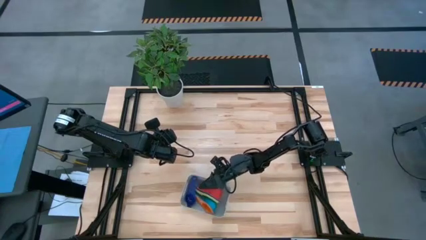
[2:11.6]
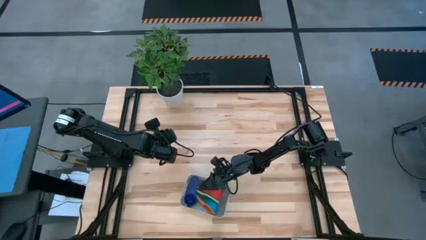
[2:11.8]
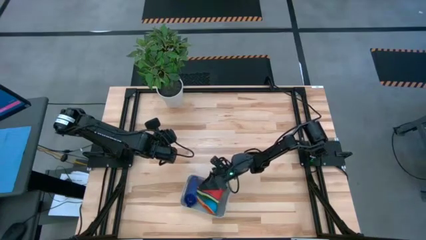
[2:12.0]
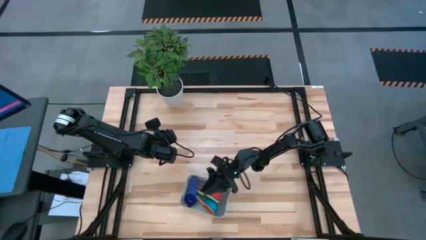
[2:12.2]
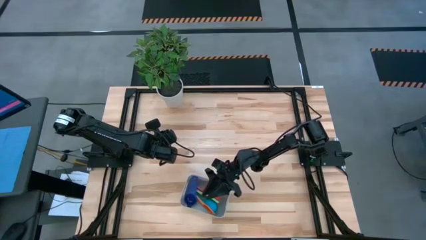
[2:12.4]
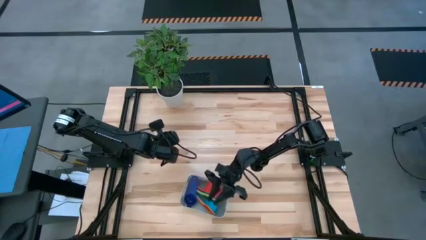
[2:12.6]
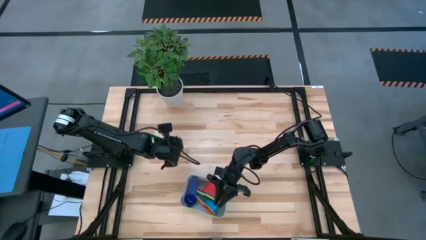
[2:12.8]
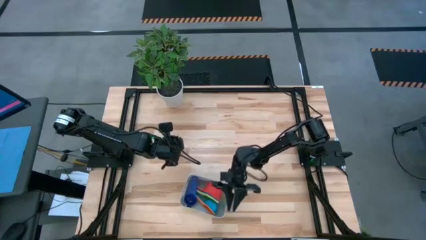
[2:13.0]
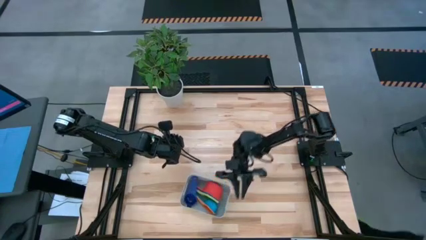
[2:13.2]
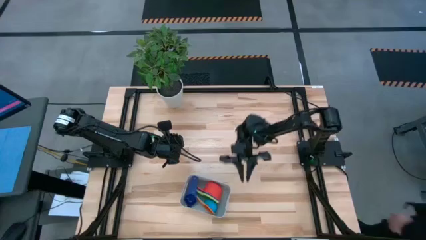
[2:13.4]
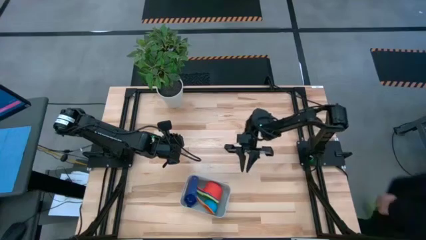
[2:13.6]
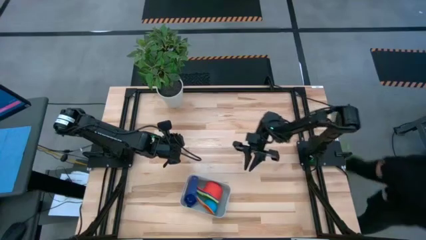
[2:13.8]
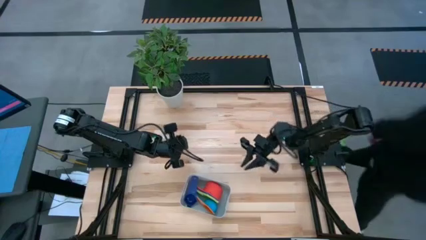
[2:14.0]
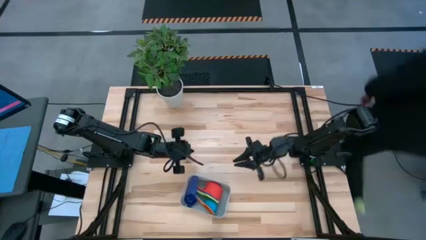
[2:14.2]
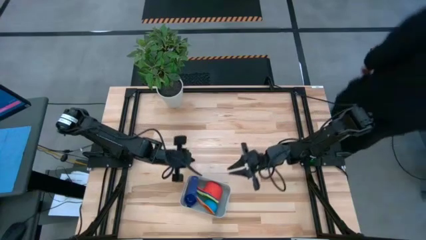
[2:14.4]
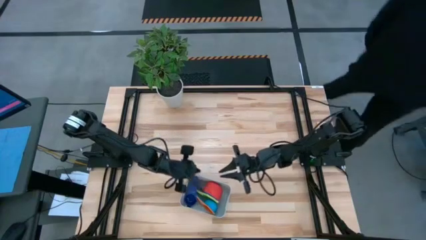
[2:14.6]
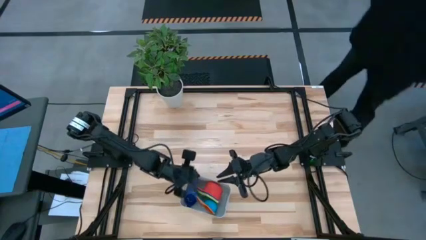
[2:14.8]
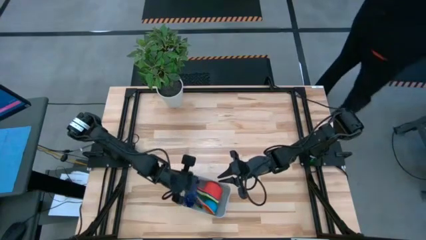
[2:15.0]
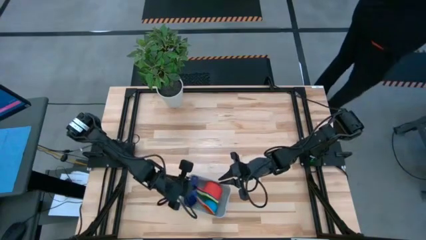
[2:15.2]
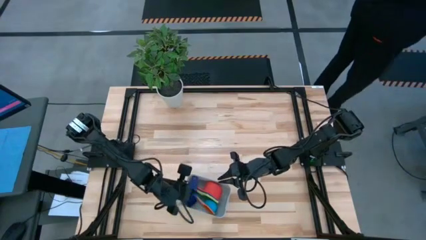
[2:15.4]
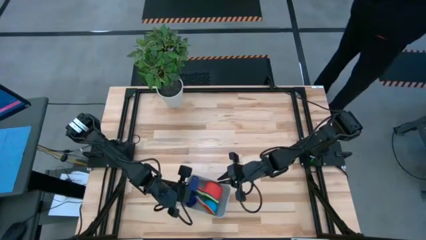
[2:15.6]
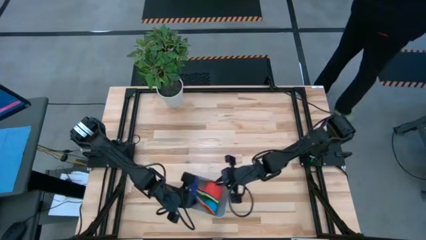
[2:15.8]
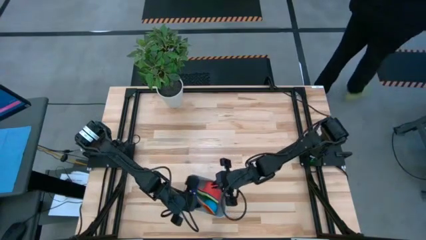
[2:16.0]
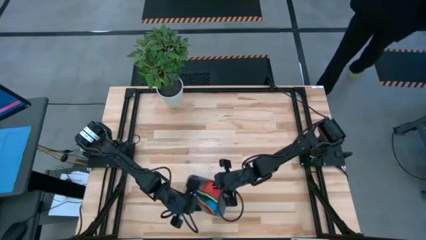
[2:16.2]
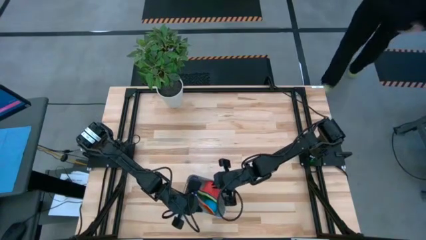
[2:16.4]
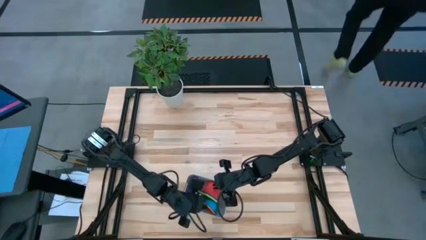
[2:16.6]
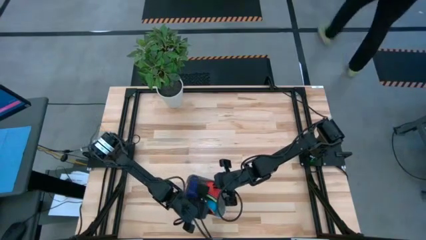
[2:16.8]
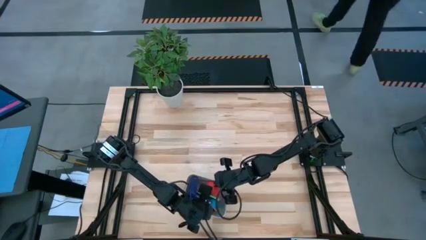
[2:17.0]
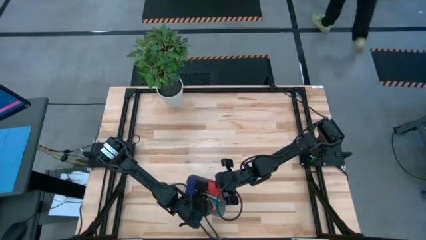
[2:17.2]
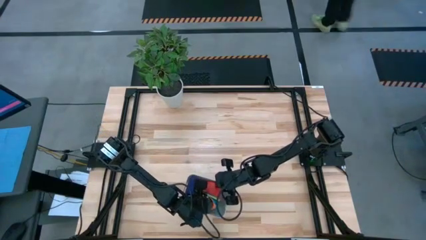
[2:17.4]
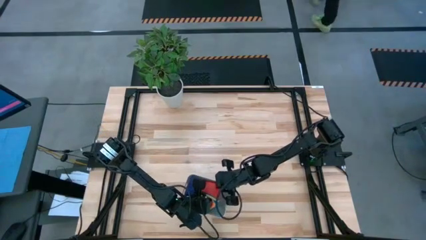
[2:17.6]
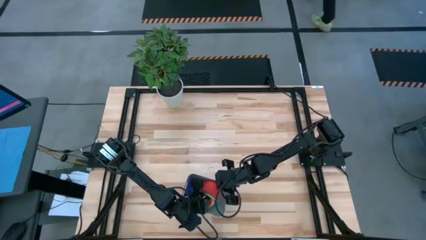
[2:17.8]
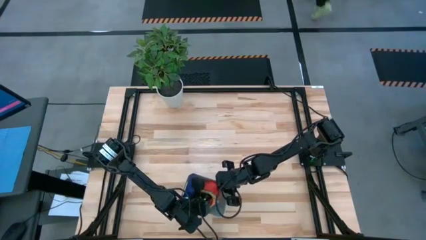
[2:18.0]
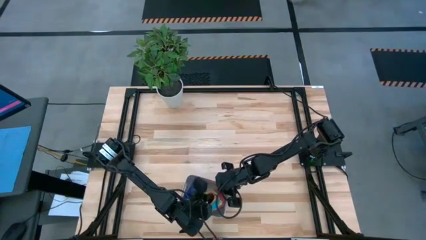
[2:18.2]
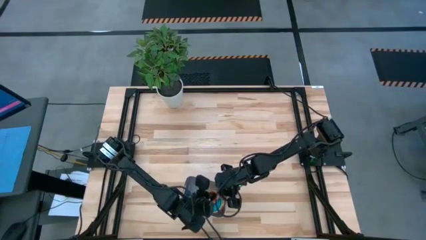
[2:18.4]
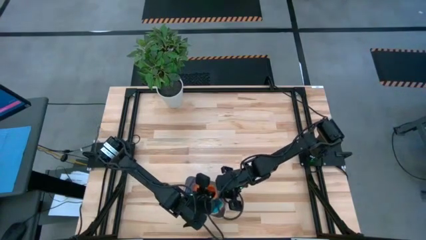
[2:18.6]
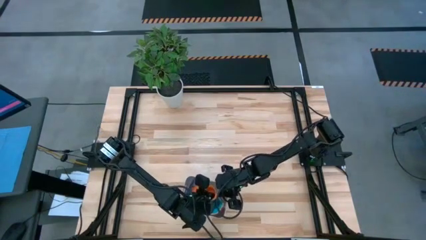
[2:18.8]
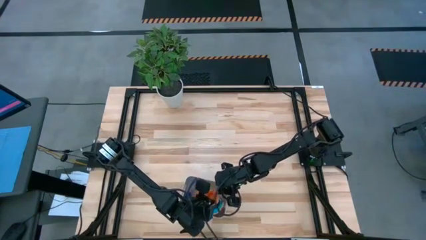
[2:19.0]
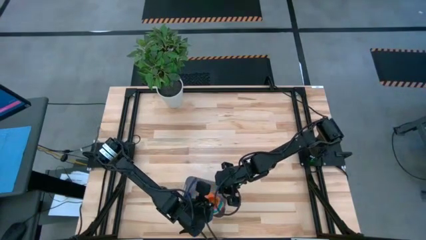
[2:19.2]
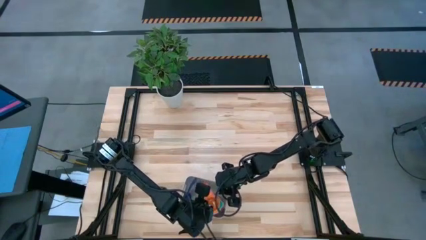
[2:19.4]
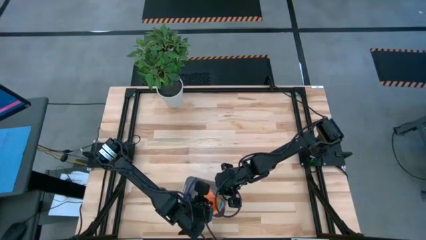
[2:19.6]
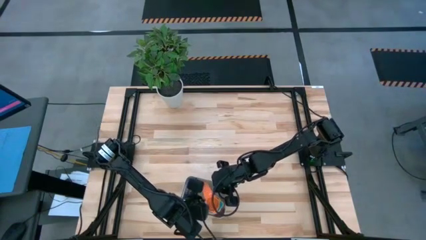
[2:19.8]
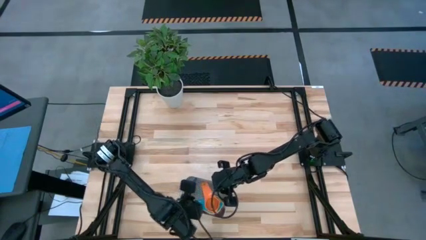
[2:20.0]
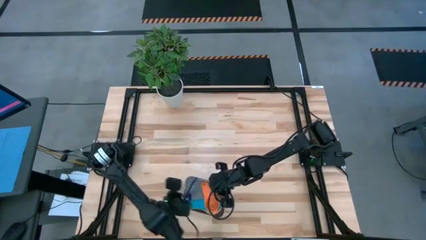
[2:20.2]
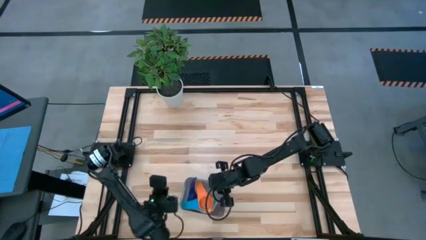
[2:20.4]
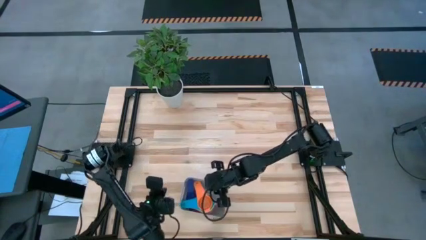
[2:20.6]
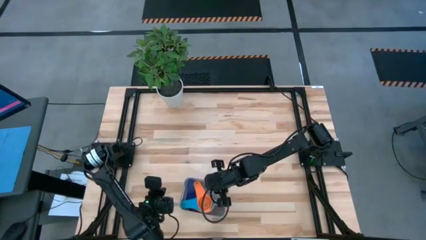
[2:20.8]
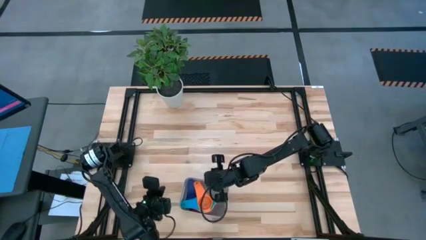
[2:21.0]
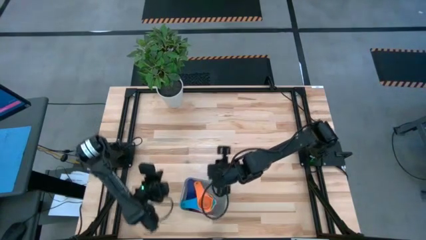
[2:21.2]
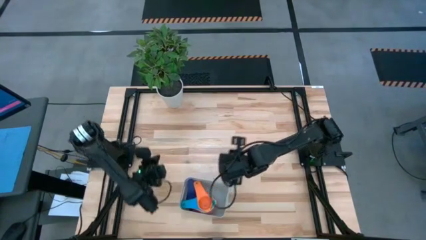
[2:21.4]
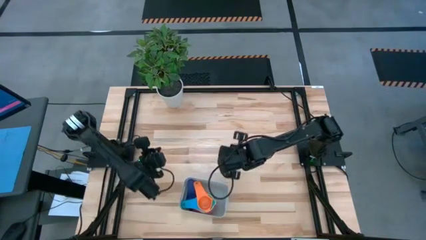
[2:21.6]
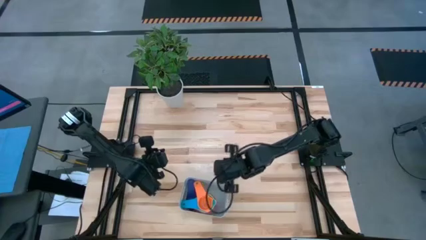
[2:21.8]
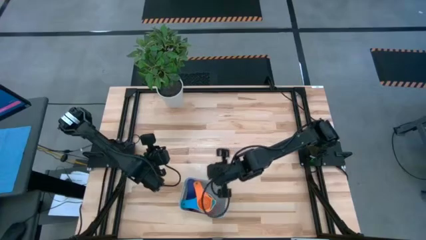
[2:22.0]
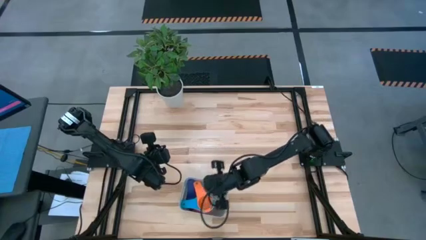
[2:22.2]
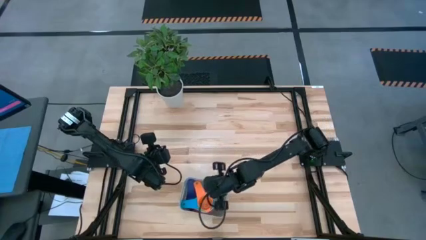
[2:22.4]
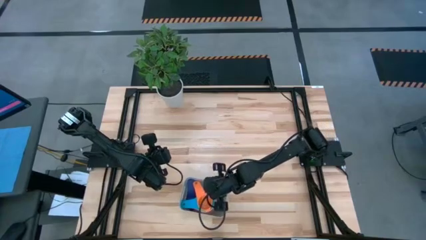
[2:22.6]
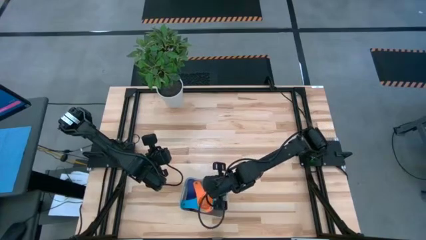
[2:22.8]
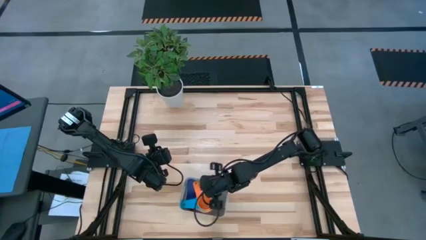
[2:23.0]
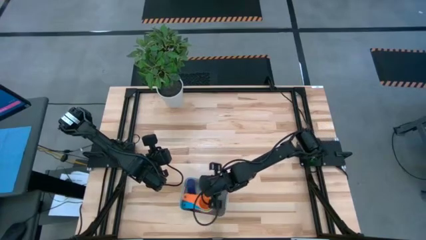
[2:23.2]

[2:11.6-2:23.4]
Task: Nest measuring cups in basket
Adjust the stacked measuring cups in the gray bin

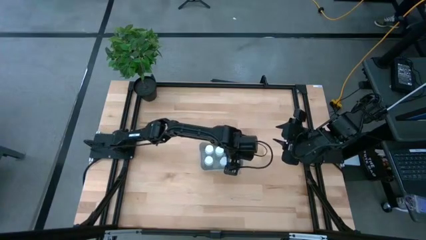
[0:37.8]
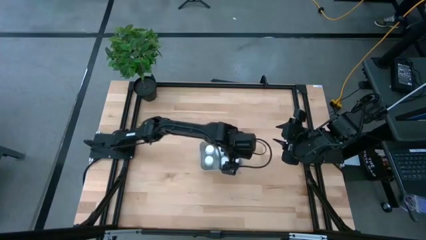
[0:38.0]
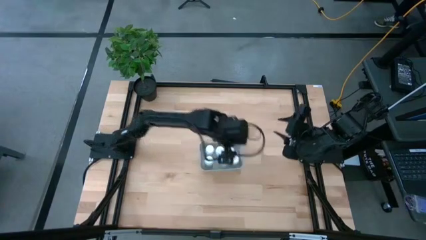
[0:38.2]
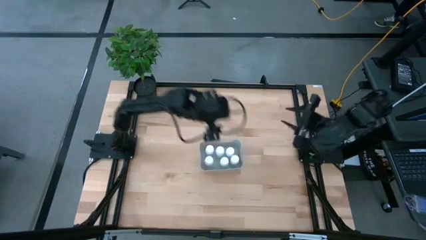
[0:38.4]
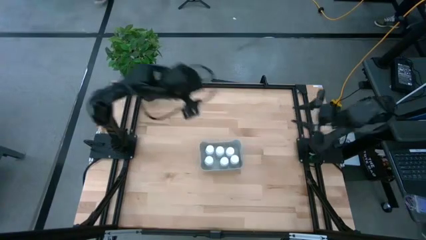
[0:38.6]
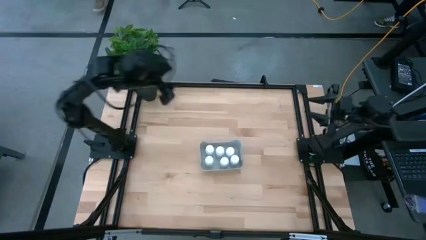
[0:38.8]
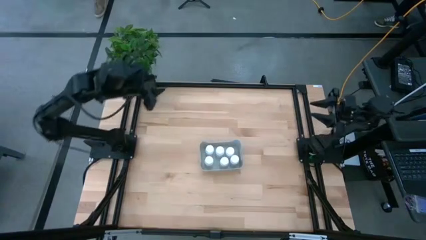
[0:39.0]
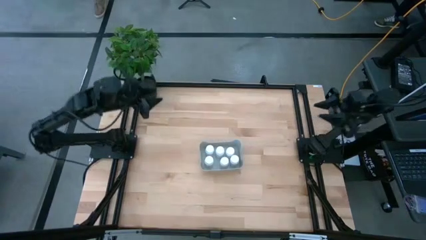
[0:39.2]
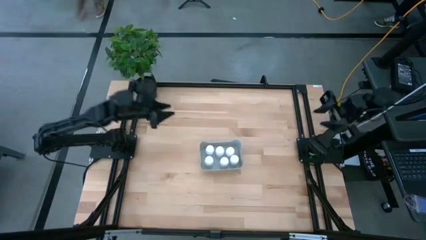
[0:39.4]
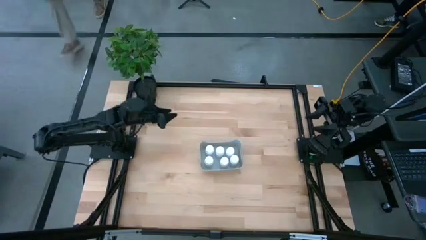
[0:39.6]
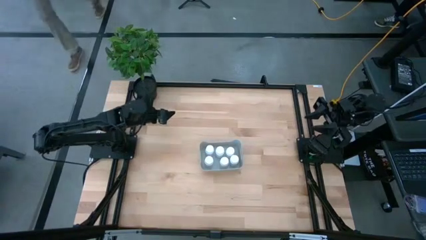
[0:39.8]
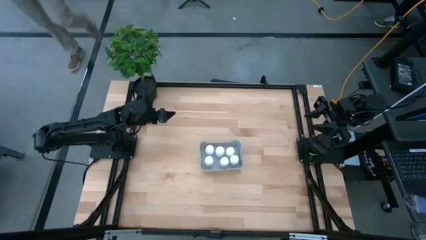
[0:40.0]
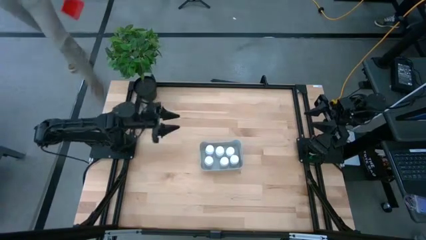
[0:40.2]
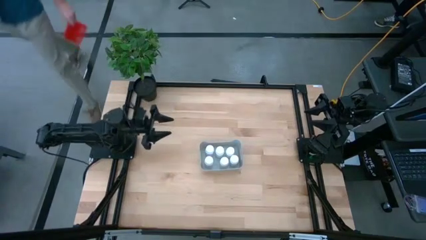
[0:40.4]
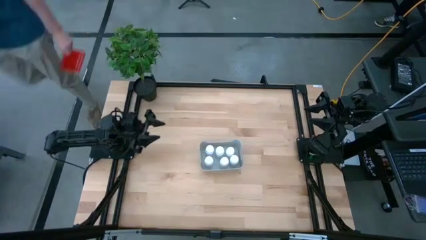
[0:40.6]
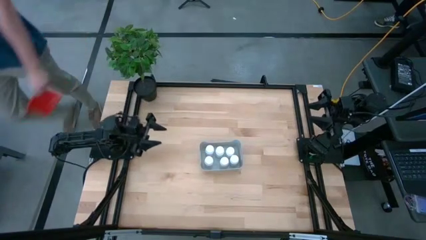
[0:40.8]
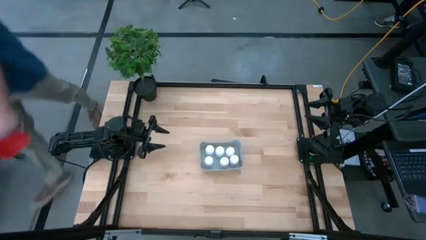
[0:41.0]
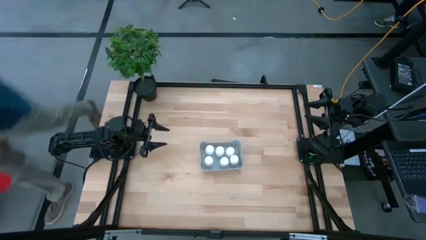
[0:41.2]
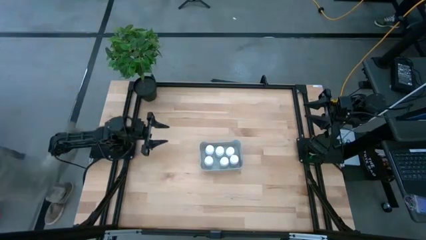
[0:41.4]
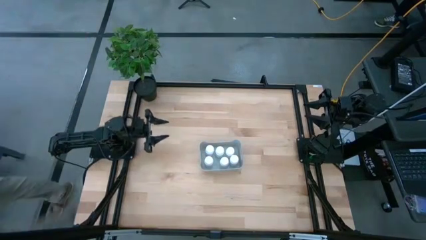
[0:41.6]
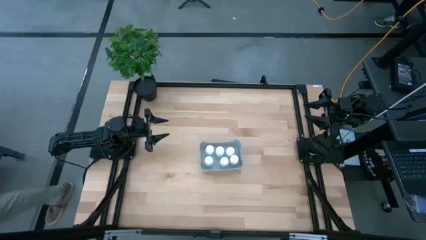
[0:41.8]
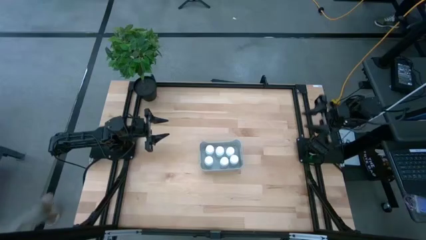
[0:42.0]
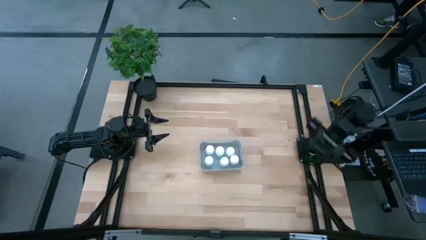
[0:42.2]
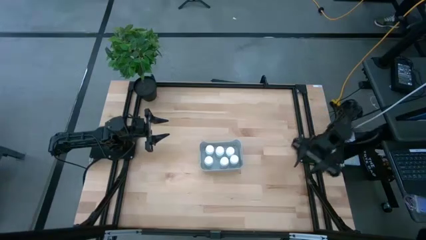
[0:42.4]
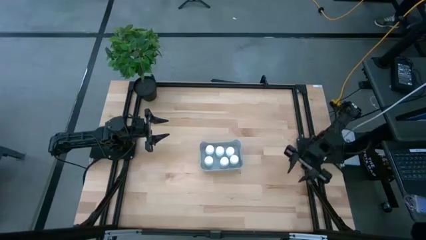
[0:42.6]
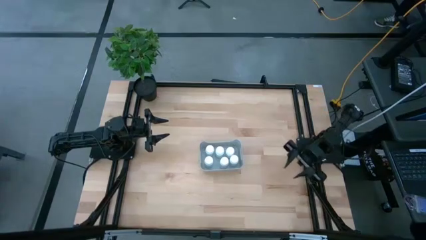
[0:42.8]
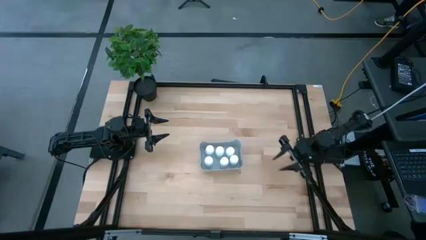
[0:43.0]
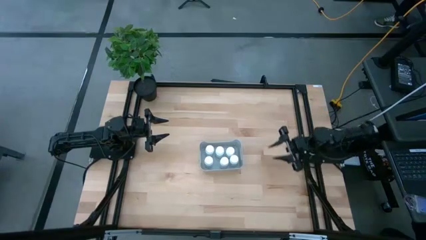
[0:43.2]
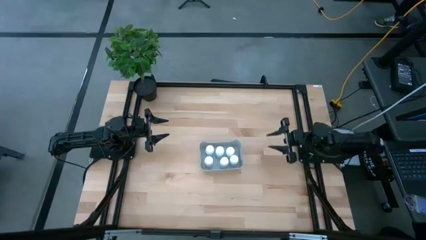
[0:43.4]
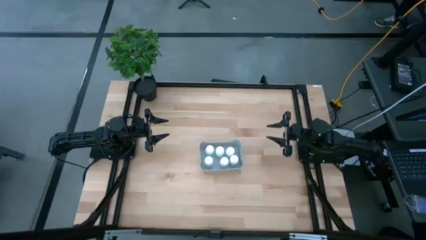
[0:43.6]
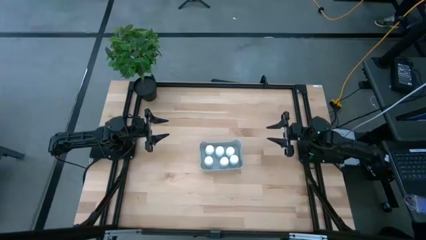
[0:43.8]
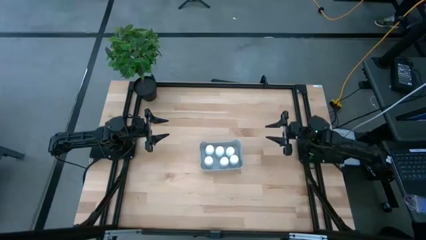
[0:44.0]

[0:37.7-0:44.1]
Task: Pick and place pill bottles into a basket
Return to Home Position
